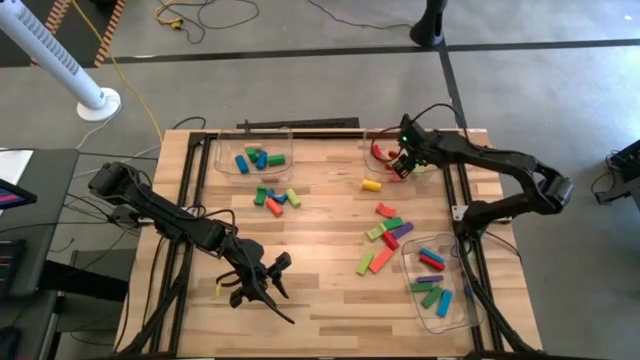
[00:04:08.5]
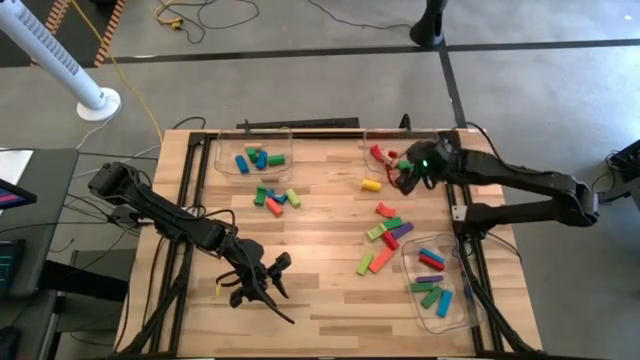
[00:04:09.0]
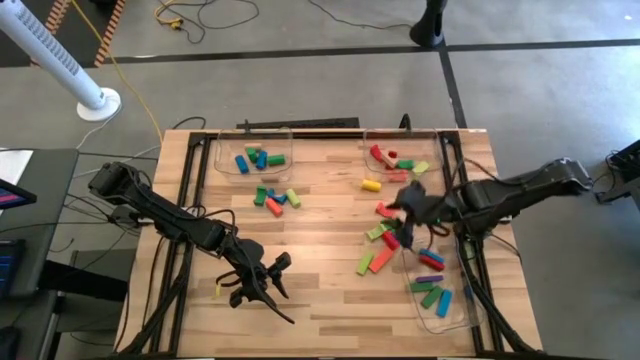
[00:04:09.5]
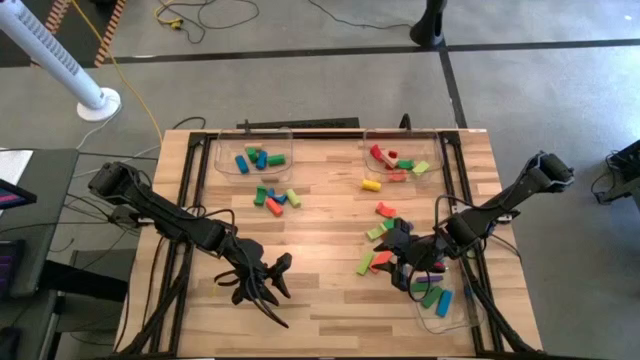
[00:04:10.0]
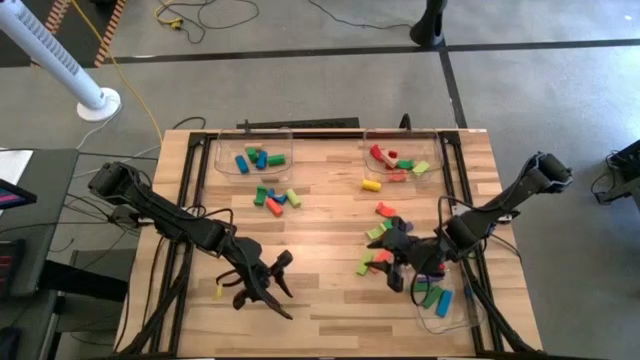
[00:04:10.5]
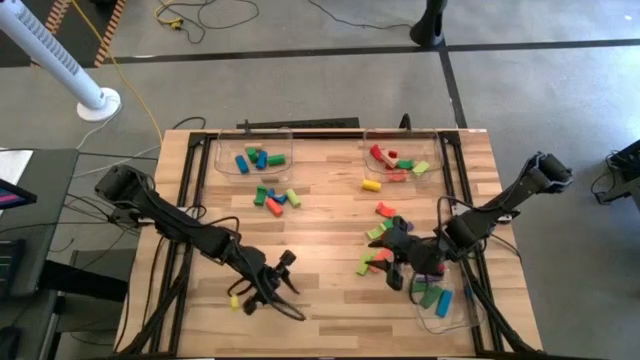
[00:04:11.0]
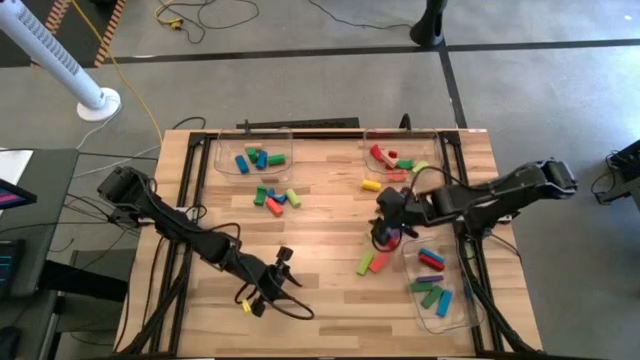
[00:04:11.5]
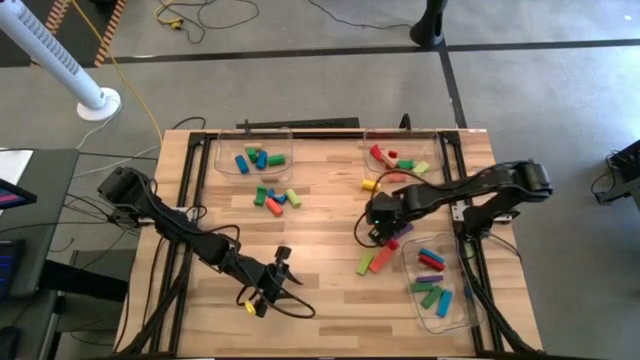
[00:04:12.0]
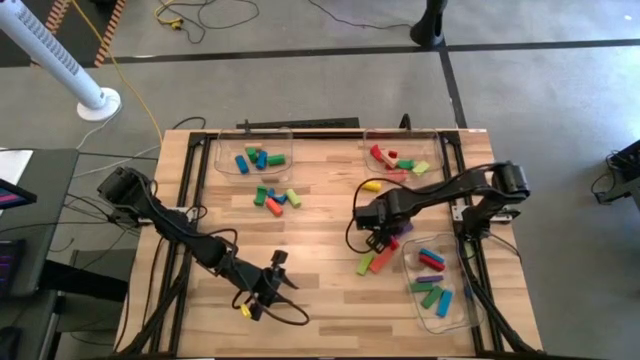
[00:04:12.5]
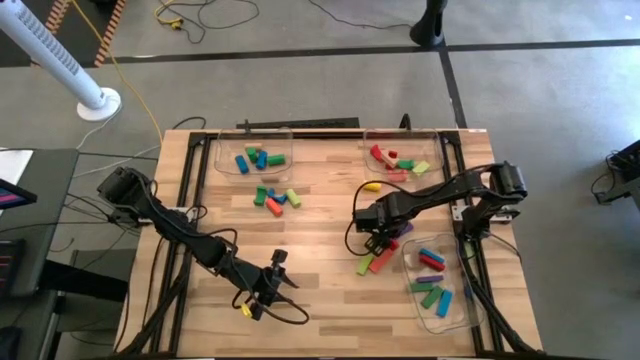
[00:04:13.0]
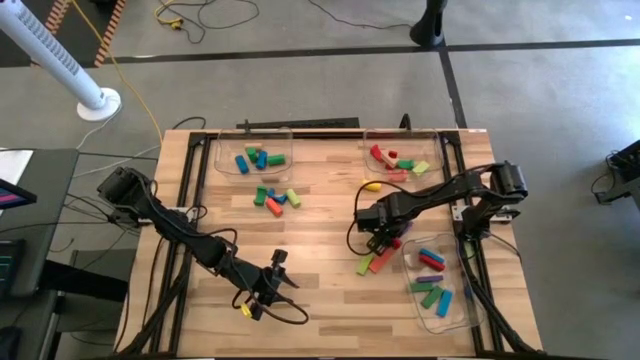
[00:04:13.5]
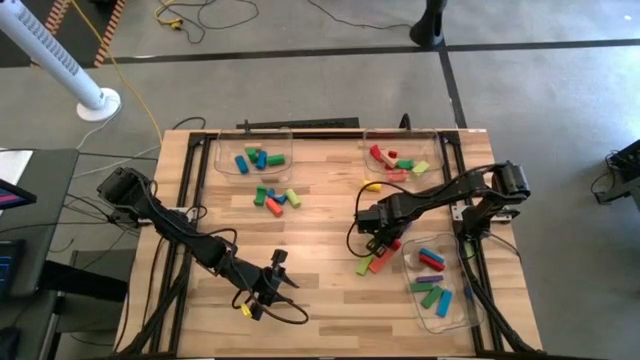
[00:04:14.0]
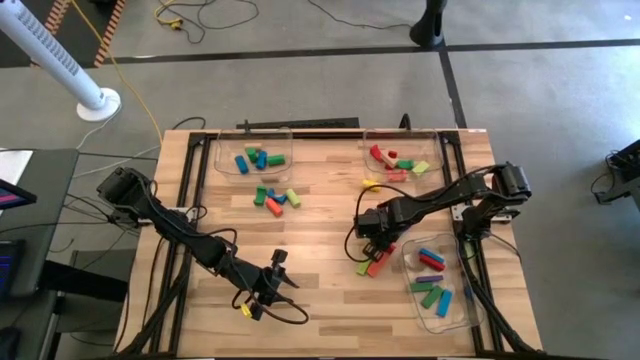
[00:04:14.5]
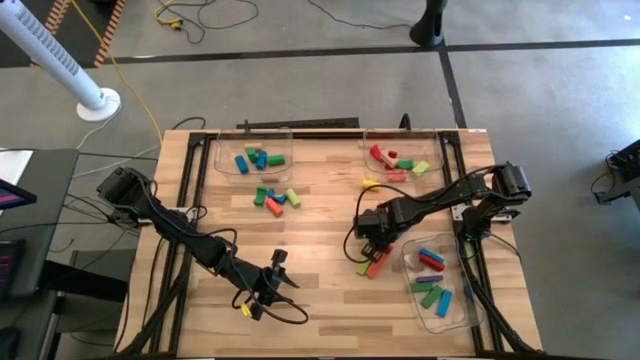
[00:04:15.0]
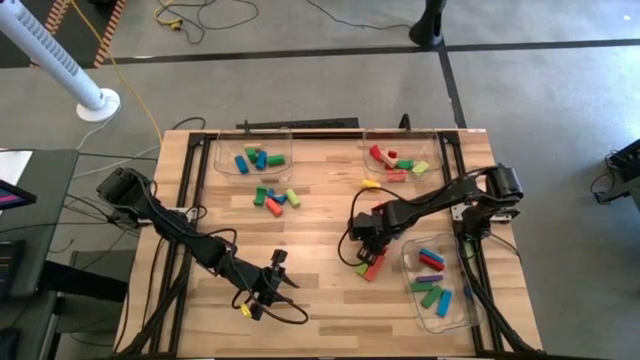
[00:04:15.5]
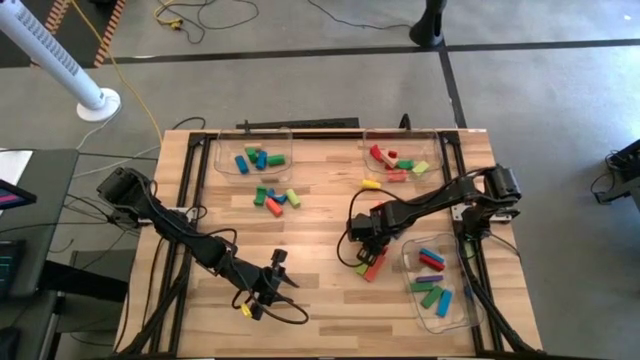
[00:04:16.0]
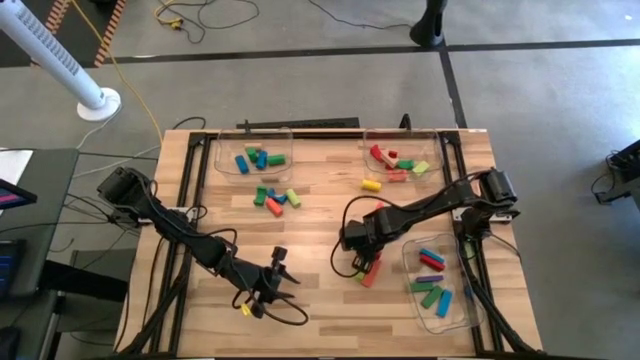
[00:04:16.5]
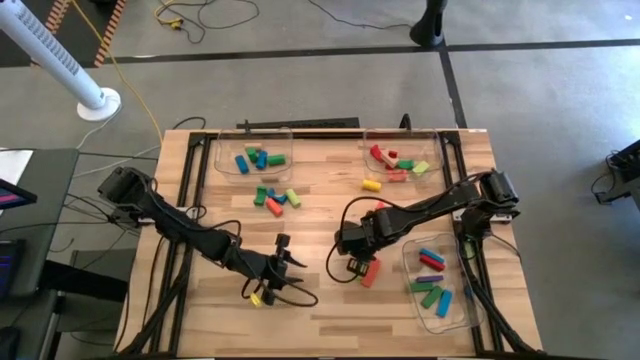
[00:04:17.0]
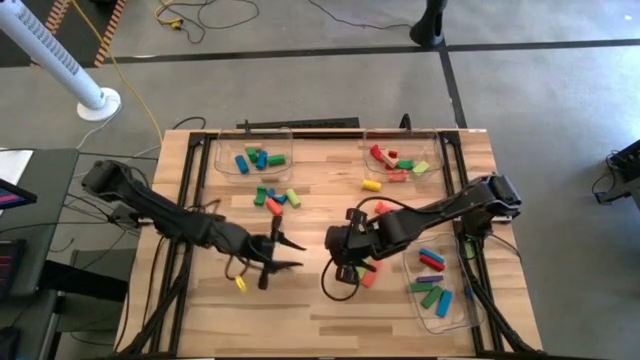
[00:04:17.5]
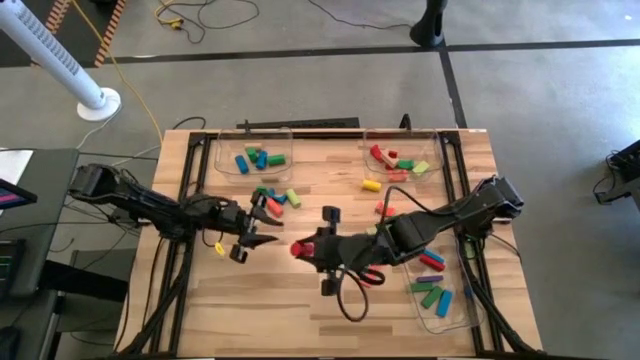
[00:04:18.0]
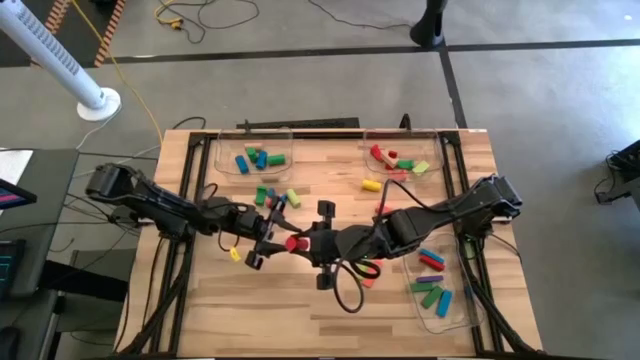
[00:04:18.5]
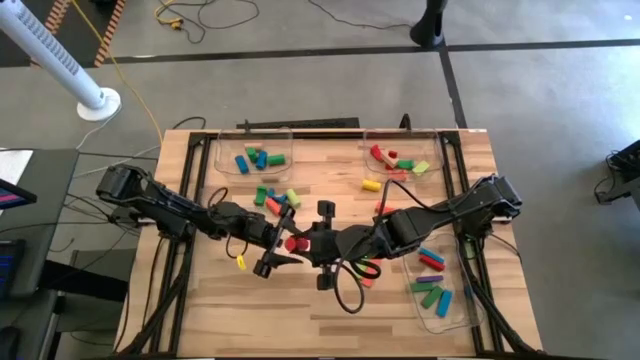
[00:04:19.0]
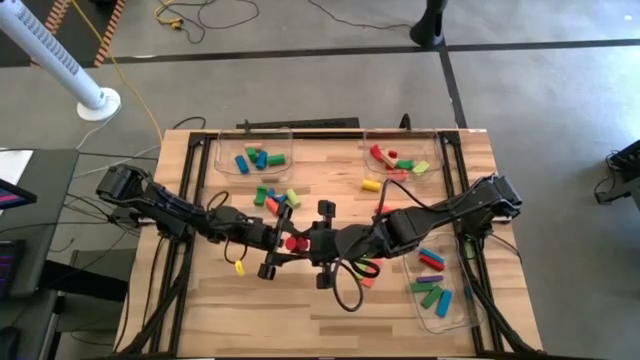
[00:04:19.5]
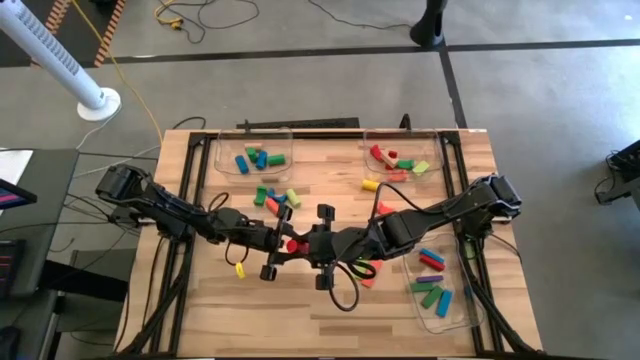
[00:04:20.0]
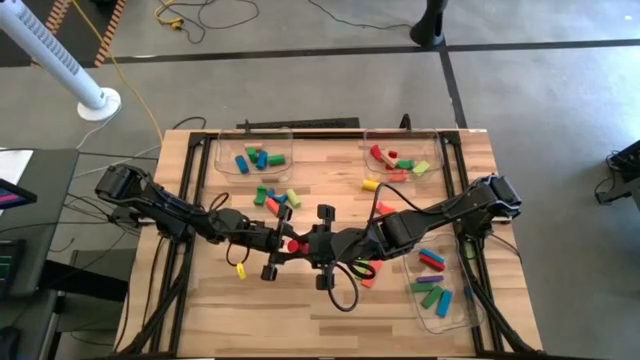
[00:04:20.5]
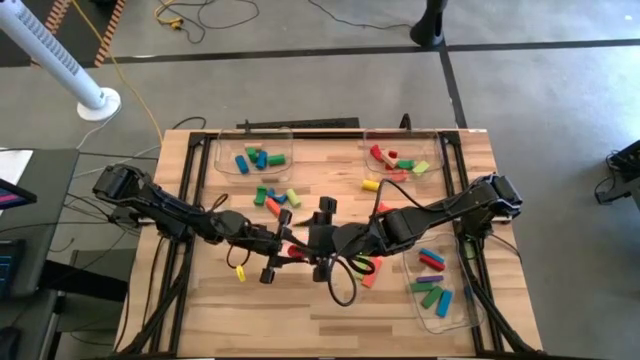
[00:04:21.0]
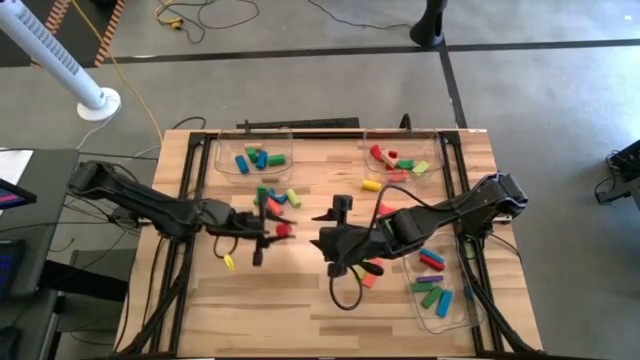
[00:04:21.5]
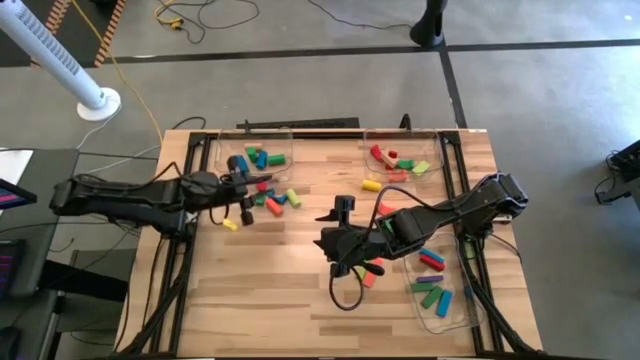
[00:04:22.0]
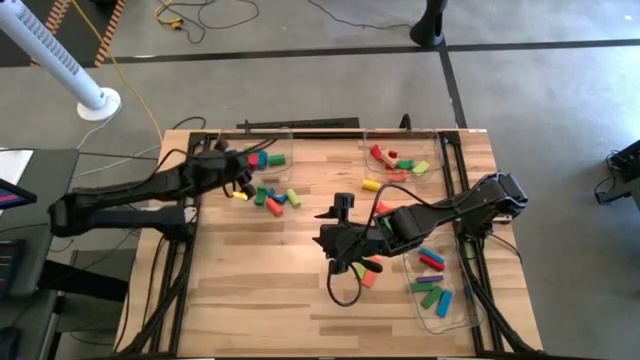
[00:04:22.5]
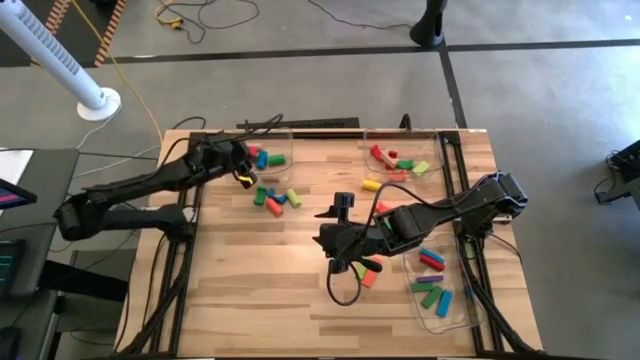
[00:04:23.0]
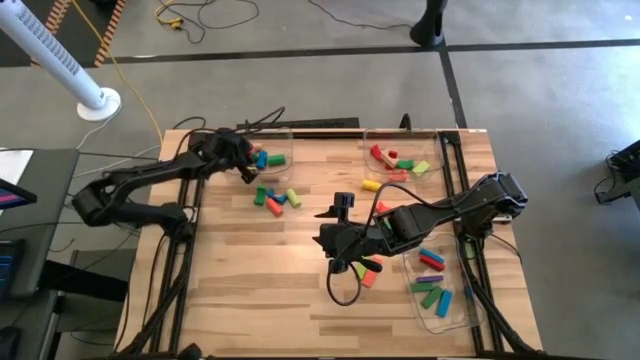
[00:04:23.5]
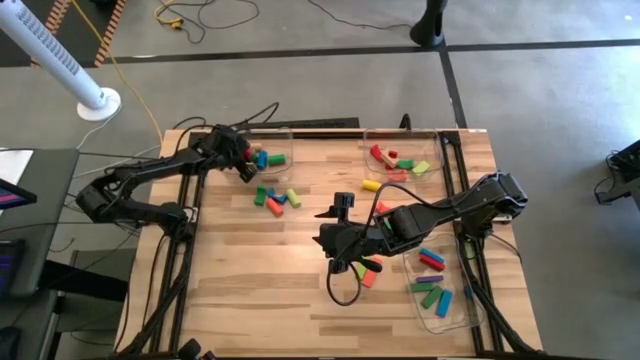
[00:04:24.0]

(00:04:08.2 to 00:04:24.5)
Task: Sort blocks by size
Put the red cylindrical block into the top left transparent bin

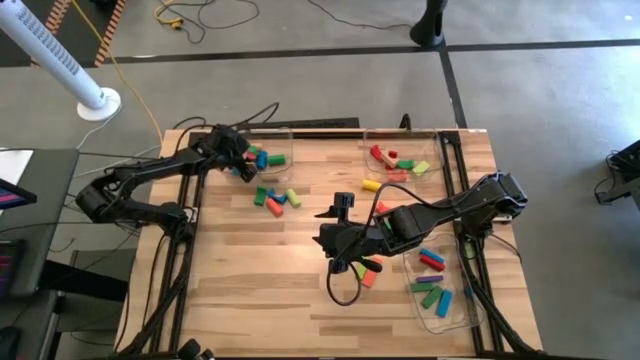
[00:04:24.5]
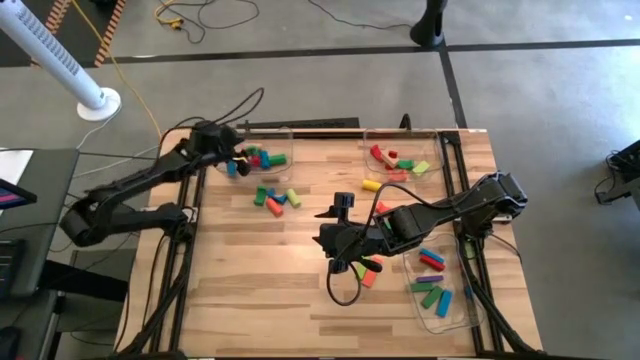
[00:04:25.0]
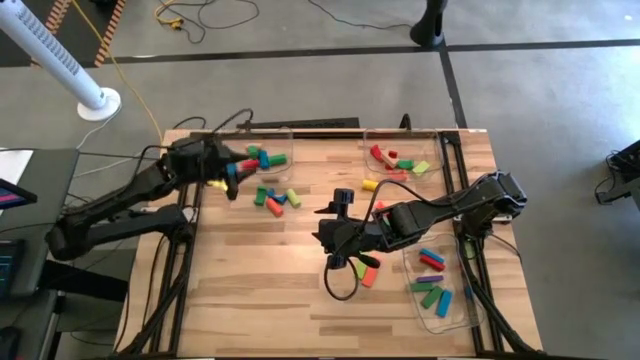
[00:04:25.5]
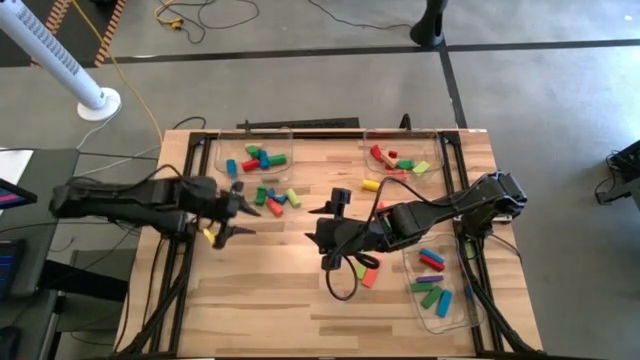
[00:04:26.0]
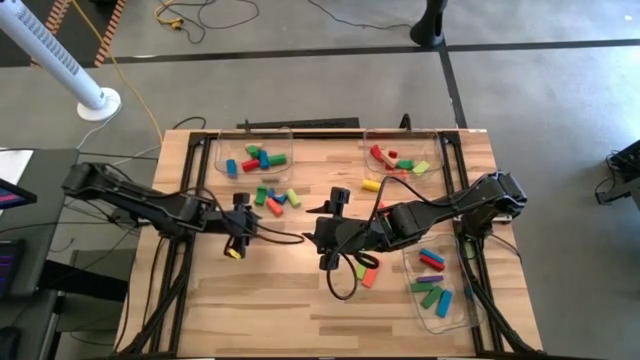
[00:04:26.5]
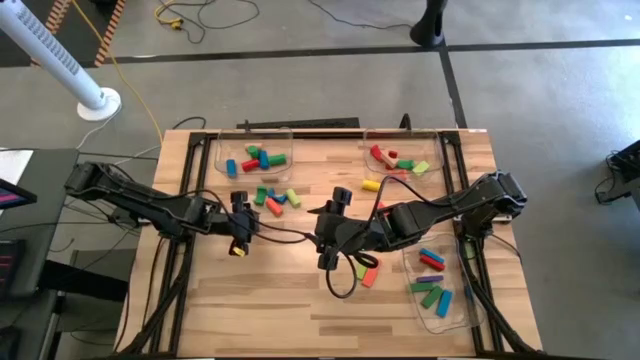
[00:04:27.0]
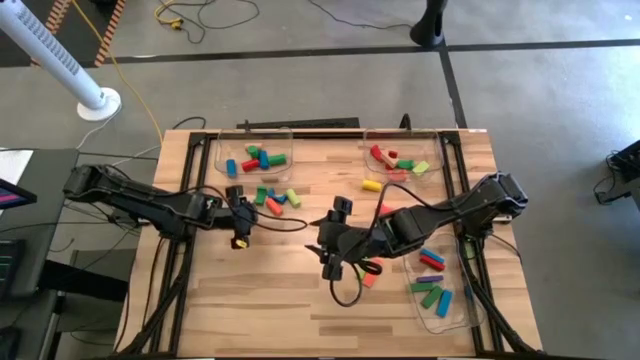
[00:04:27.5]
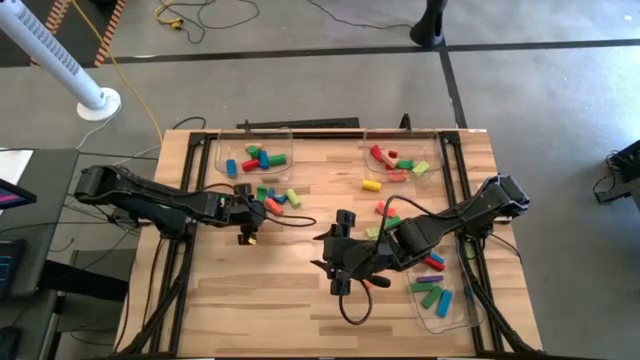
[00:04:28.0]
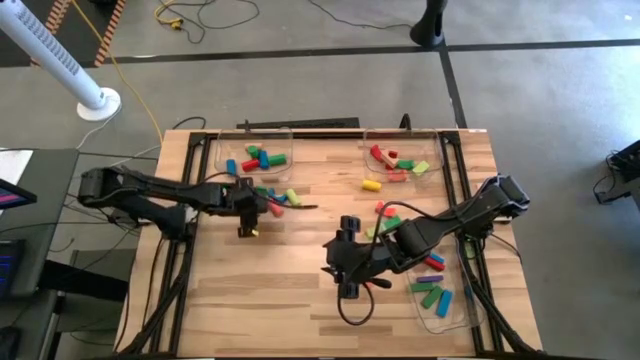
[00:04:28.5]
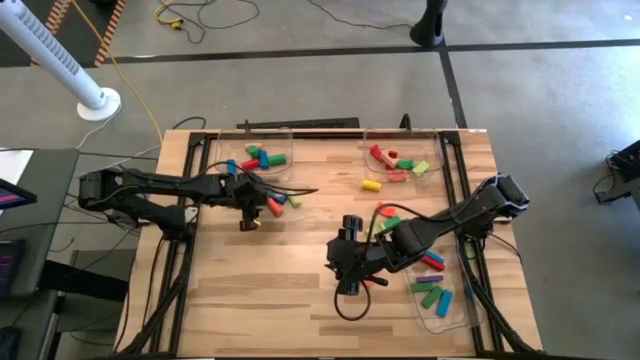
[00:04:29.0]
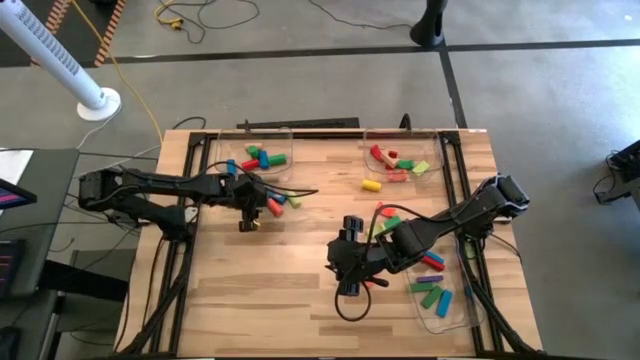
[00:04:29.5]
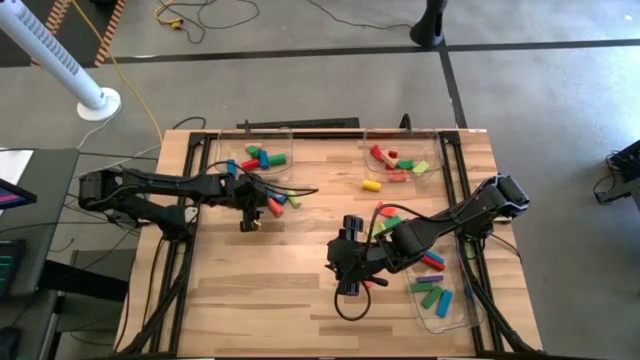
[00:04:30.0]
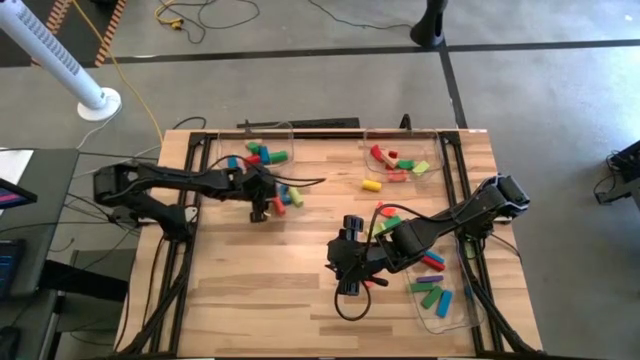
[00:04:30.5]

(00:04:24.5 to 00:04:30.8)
Put the orange cylindrical block into the top left transparent bin
